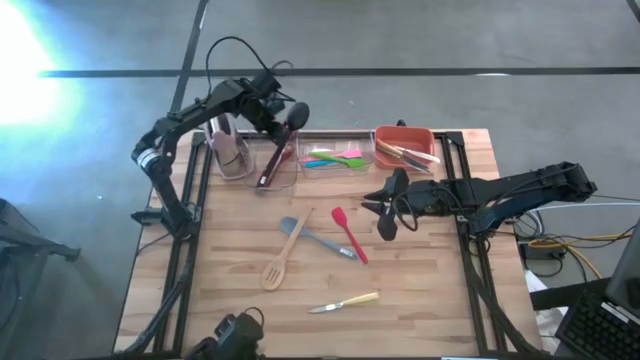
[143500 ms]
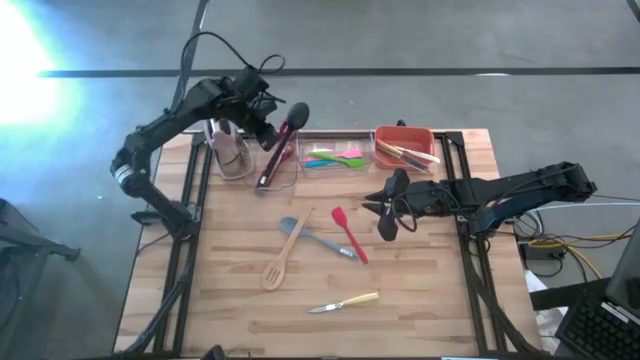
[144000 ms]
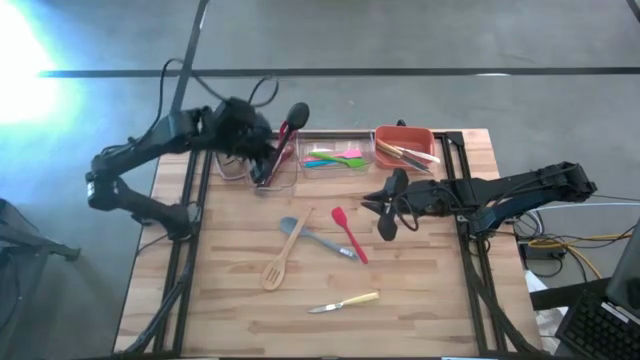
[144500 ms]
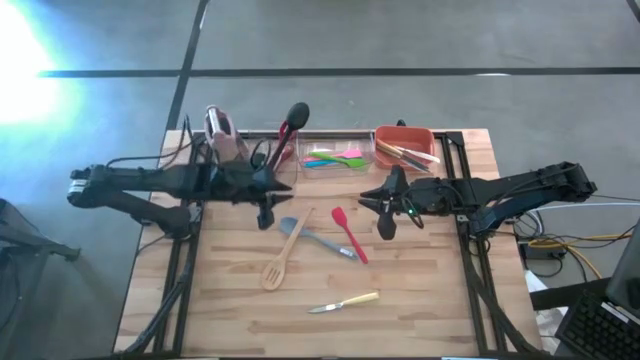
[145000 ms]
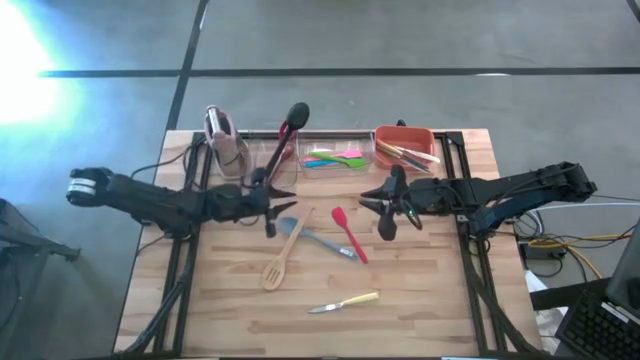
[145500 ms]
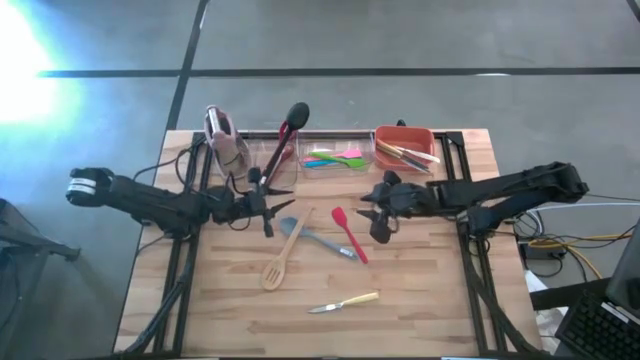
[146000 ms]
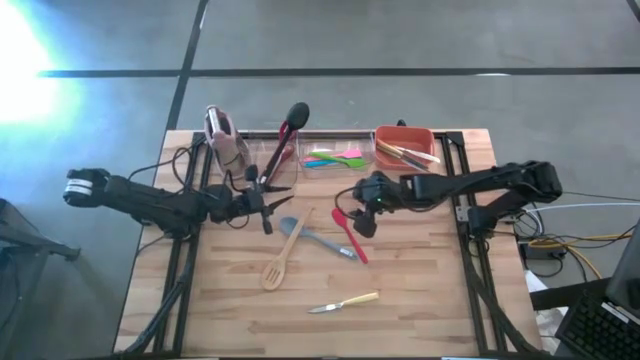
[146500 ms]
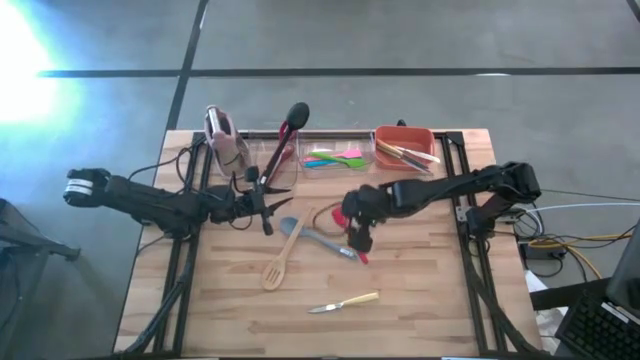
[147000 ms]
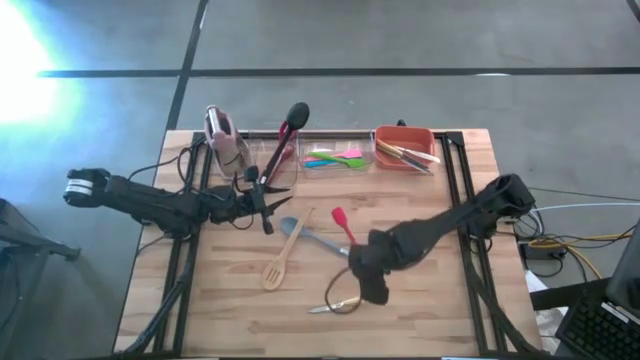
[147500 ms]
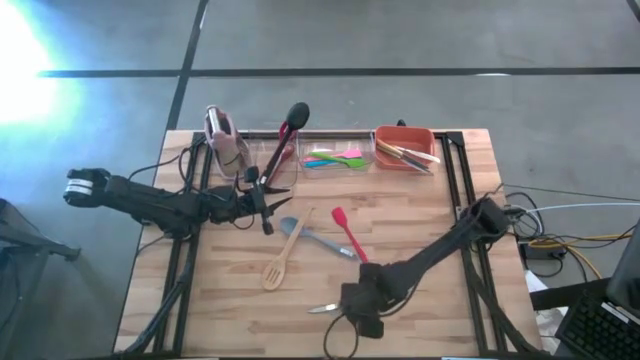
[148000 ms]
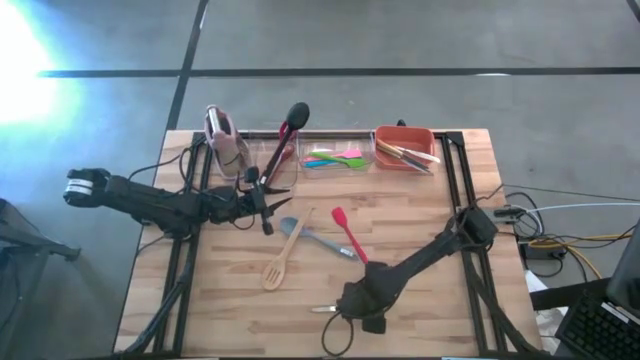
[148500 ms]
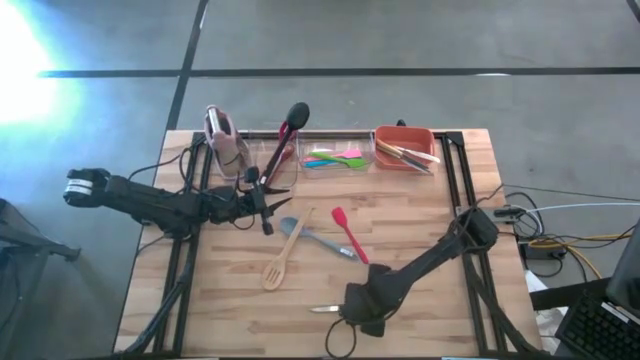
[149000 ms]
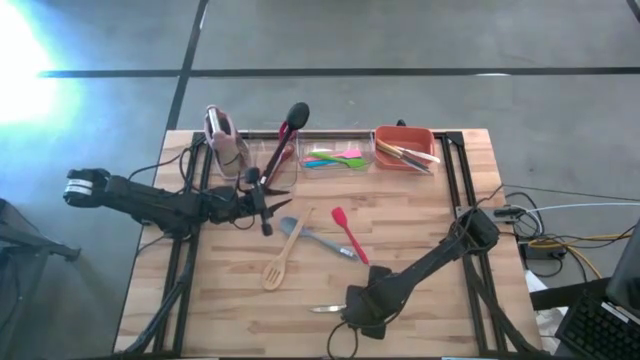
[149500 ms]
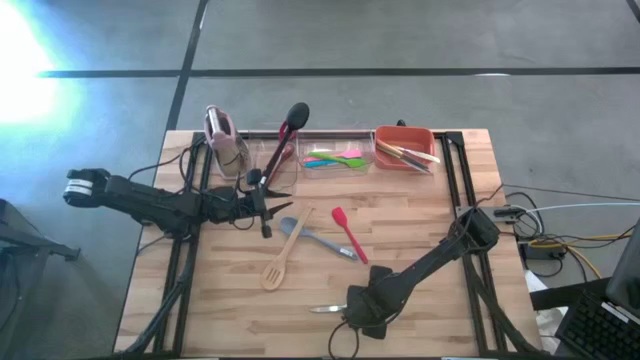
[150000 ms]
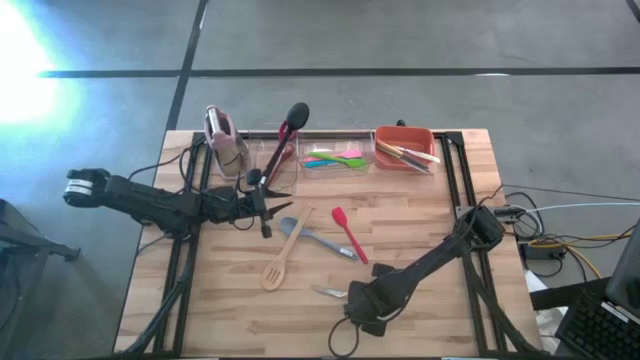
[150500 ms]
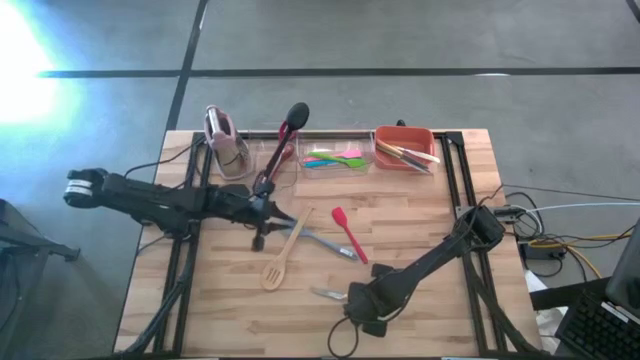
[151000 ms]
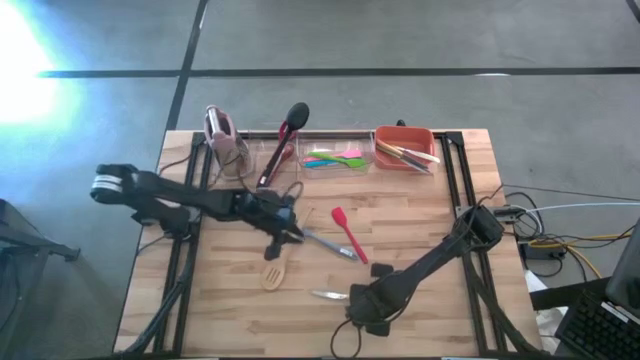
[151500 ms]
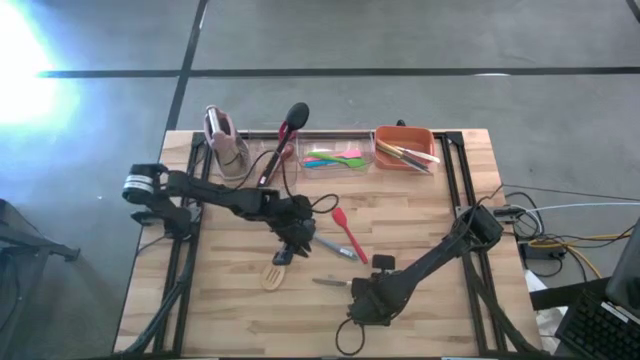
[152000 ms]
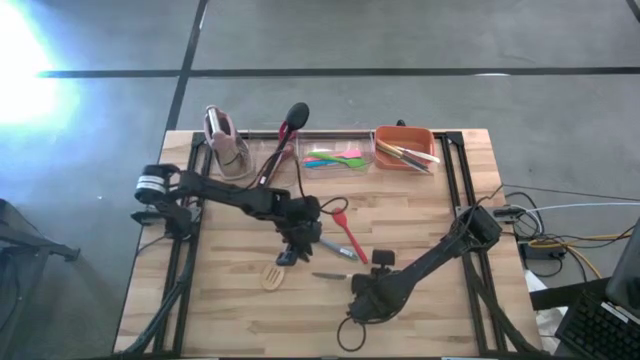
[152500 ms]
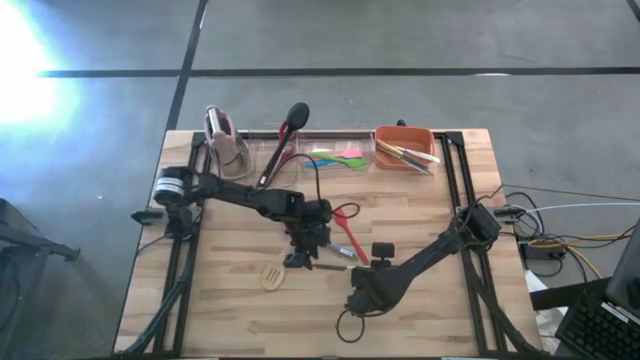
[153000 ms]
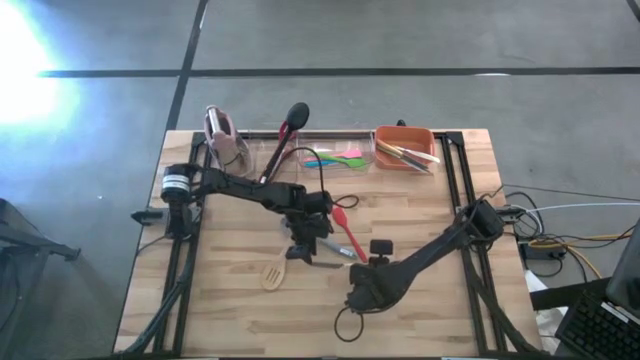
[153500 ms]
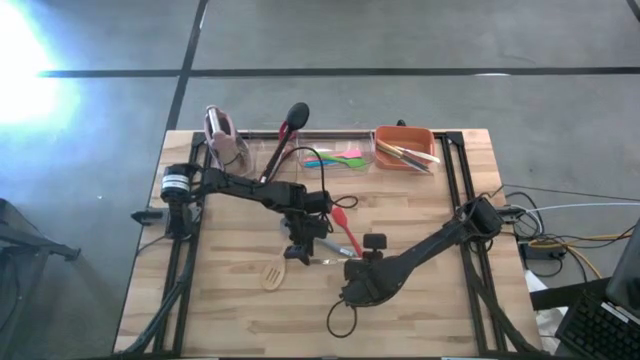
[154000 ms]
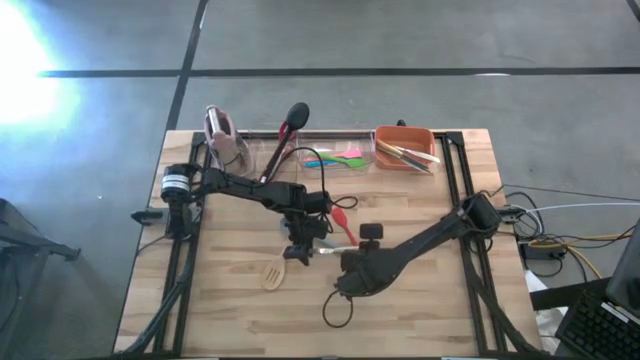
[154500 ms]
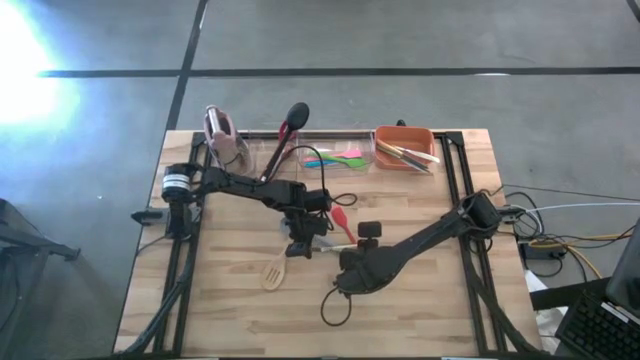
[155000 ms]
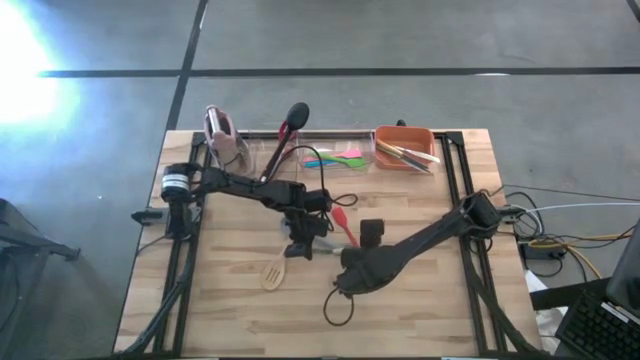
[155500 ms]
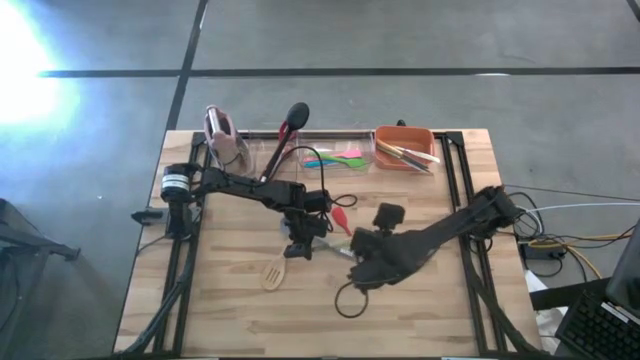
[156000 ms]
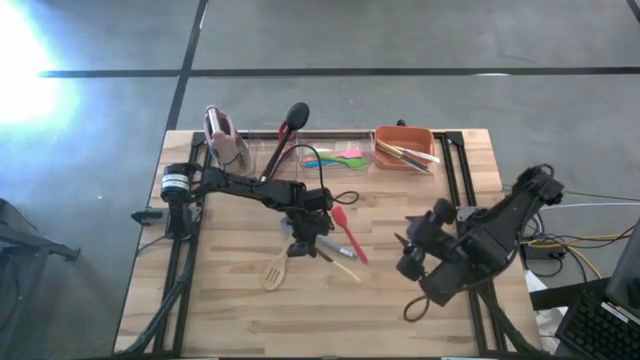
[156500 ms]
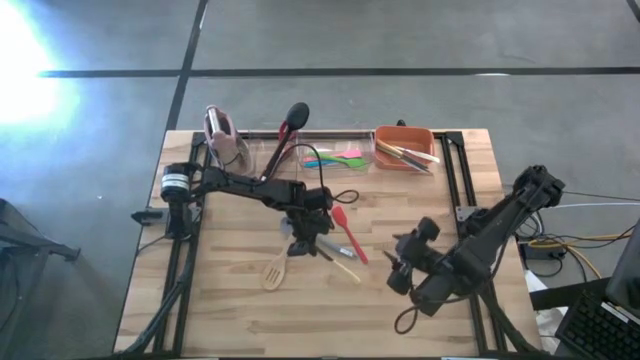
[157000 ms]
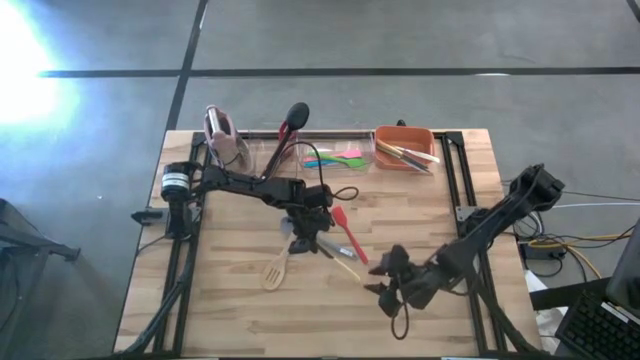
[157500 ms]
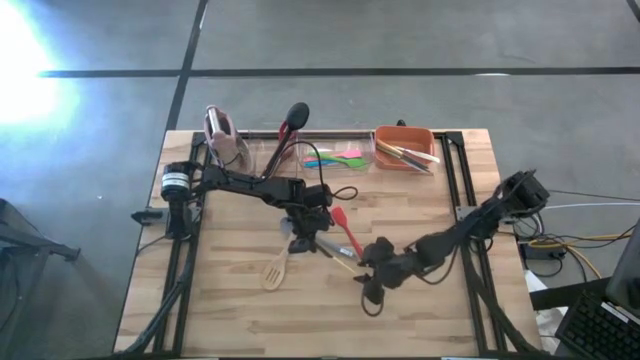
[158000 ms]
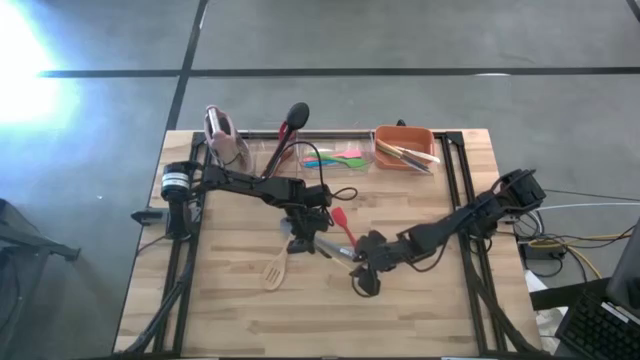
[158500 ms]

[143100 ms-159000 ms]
Task: Pick & Place Kitchen Items
Put the yellow knife into the orange bin

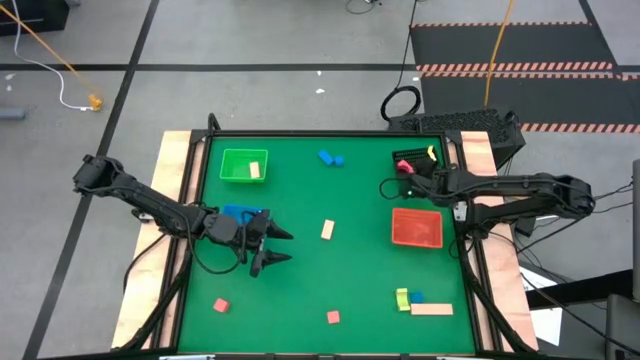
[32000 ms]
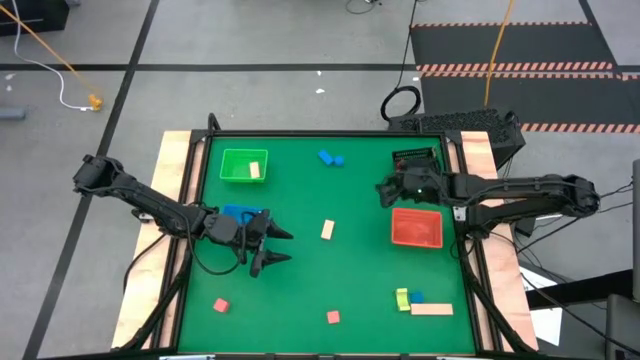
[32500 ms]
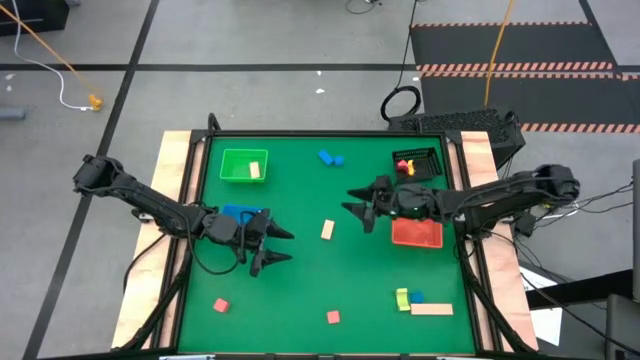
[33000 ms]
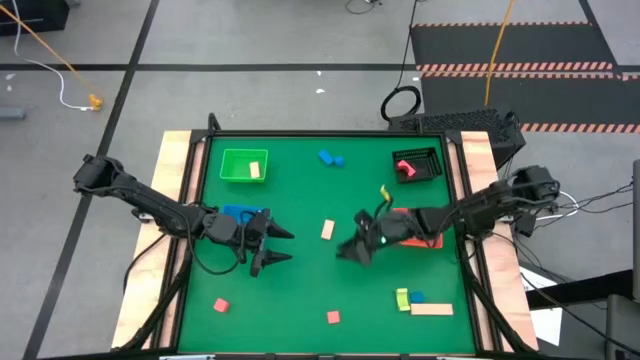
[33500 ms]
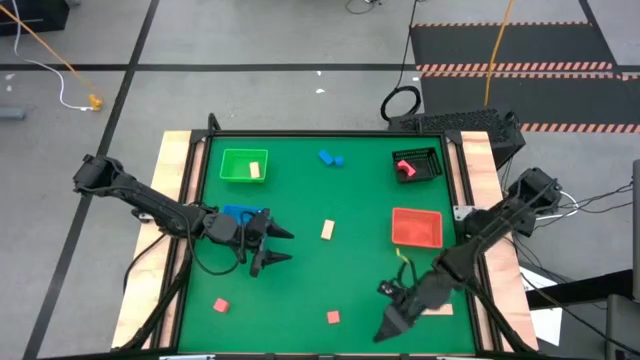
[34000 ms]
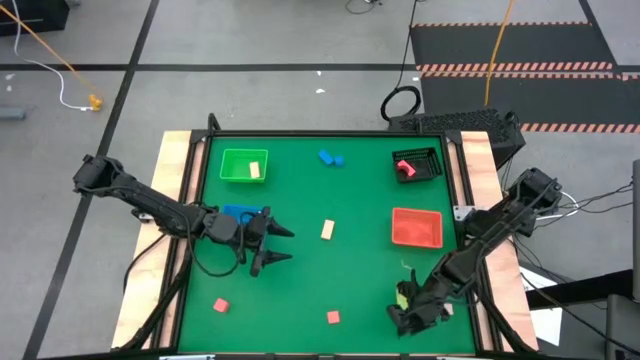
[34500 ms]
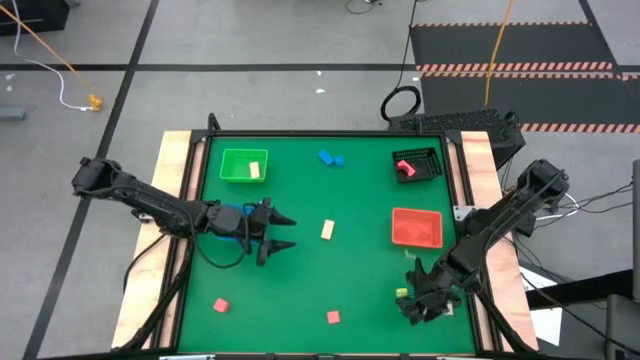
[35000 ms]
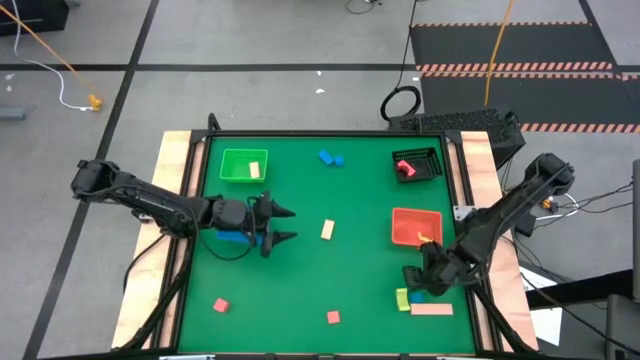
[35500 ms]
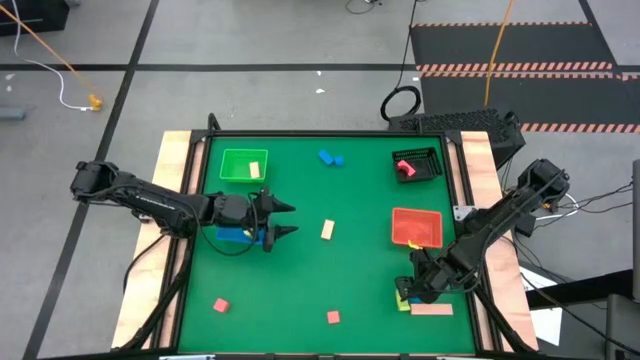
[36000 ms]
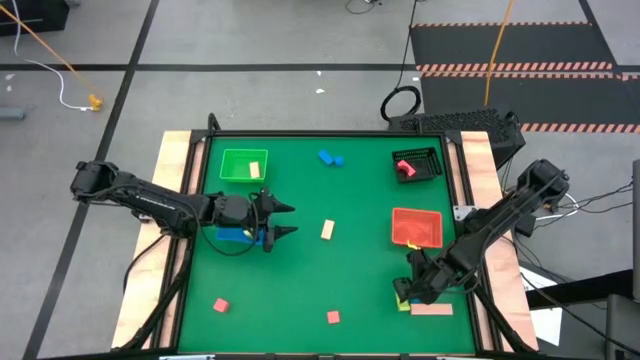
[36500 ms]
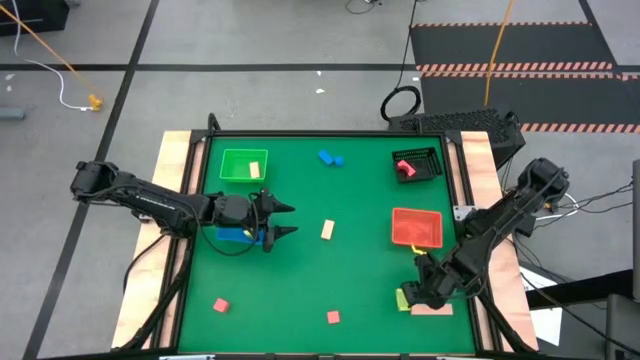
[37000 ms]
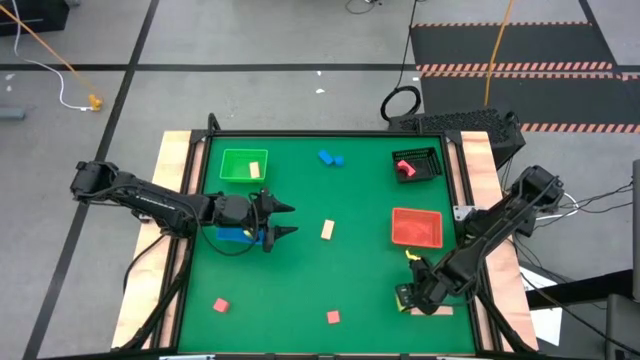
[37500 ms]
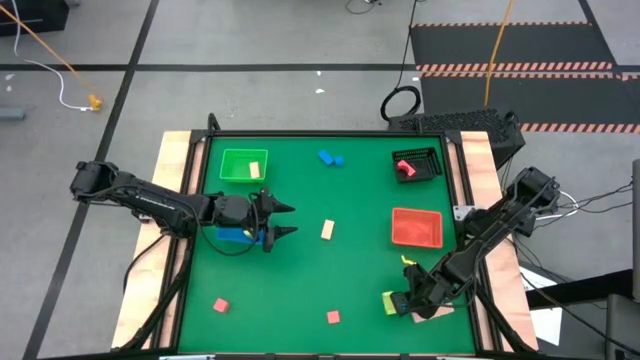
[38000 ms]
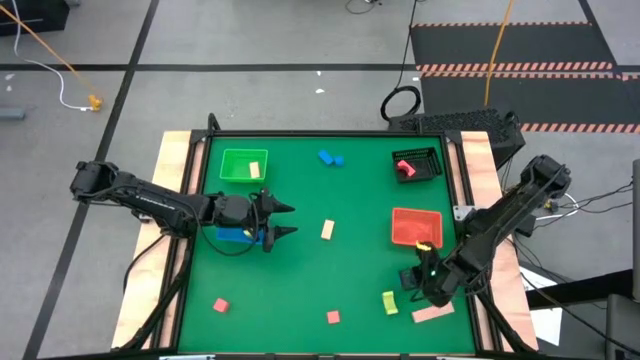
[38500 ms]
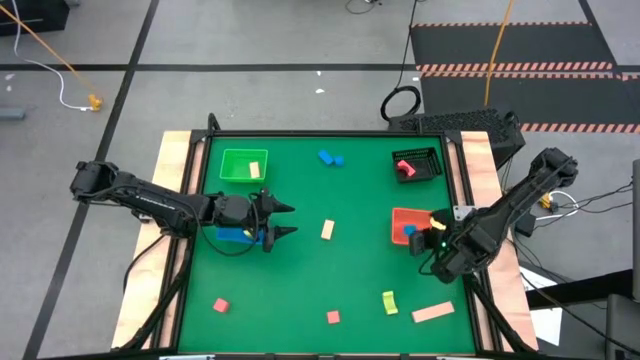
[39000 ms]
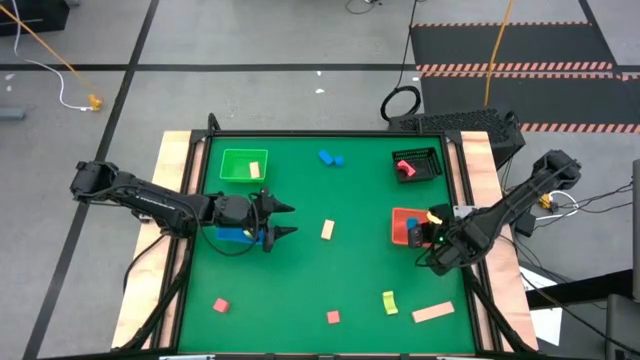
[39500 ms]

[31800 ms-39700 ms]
Task: Sort & place blocks by color
Put the bottom left blue block into the orange bin
